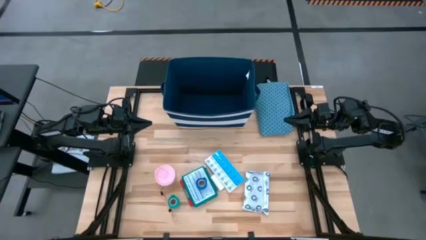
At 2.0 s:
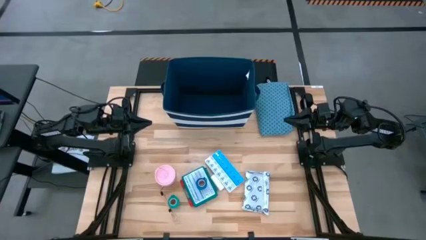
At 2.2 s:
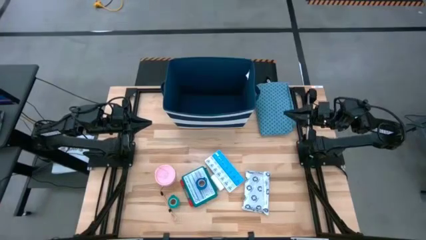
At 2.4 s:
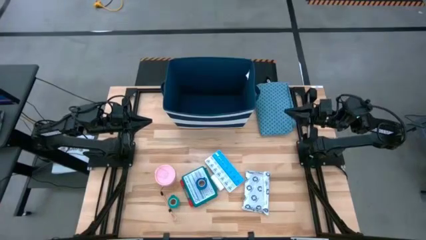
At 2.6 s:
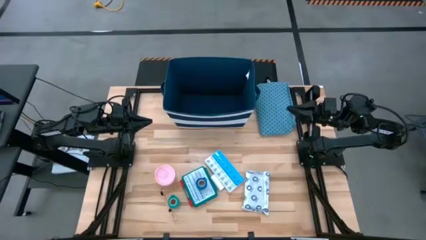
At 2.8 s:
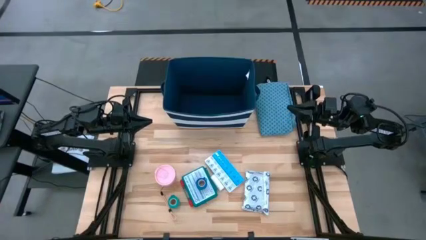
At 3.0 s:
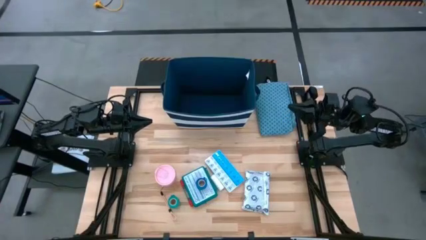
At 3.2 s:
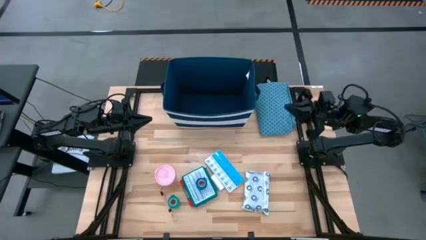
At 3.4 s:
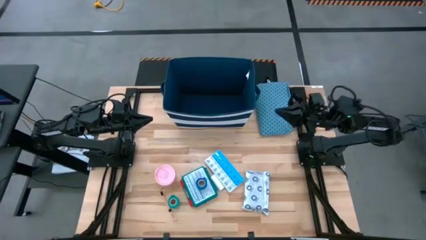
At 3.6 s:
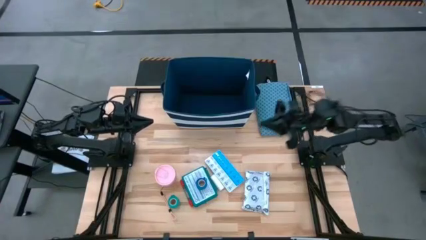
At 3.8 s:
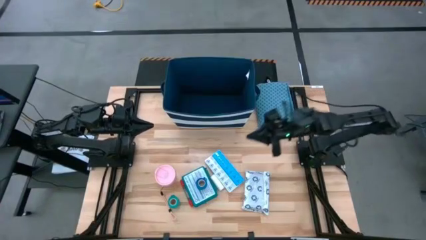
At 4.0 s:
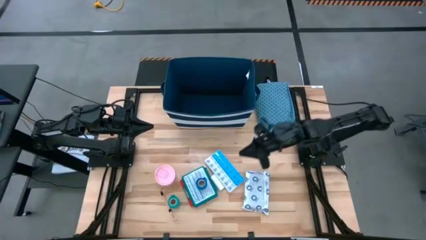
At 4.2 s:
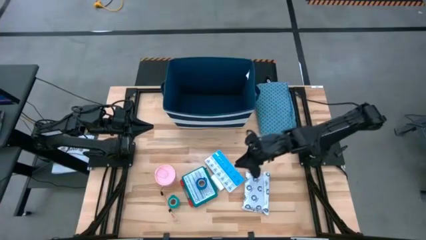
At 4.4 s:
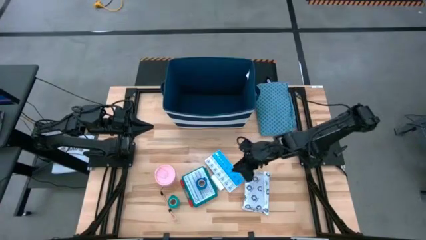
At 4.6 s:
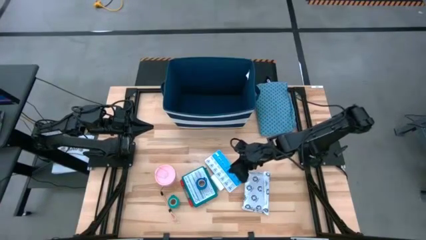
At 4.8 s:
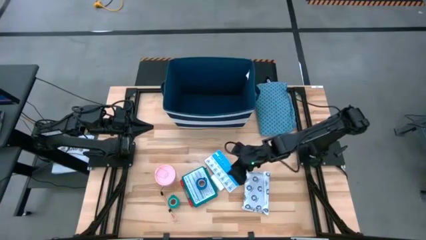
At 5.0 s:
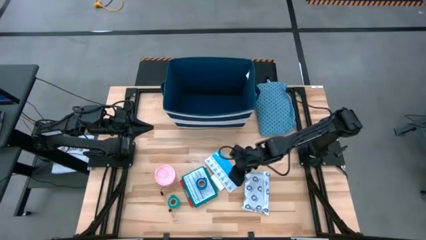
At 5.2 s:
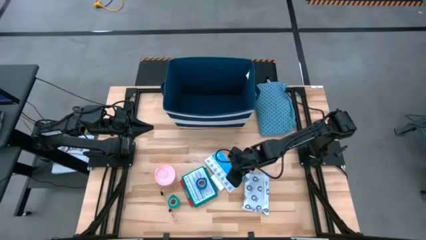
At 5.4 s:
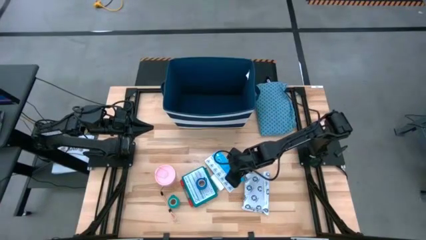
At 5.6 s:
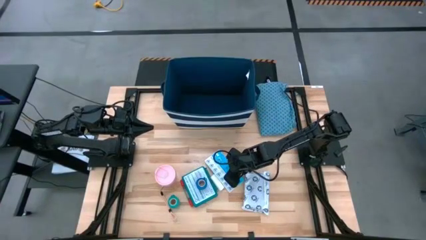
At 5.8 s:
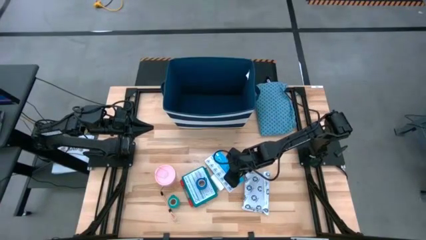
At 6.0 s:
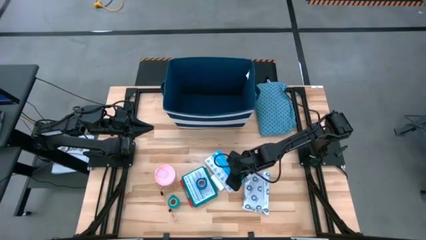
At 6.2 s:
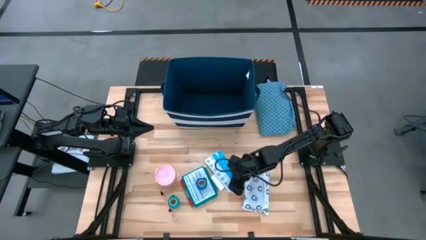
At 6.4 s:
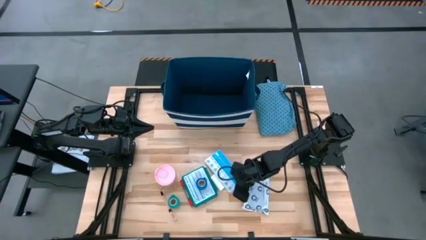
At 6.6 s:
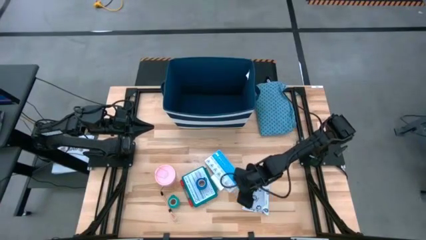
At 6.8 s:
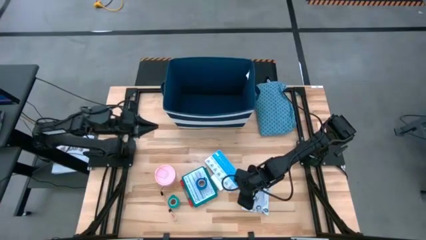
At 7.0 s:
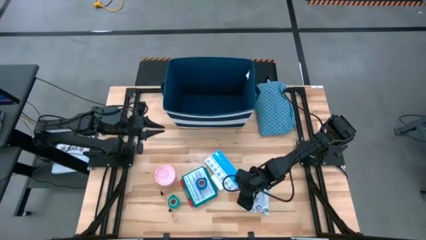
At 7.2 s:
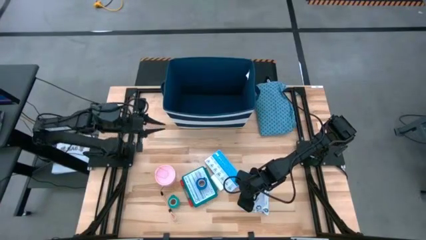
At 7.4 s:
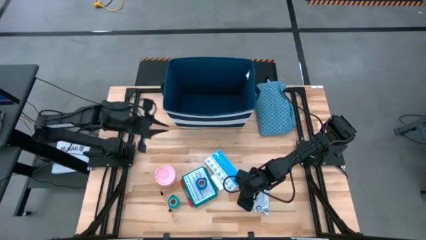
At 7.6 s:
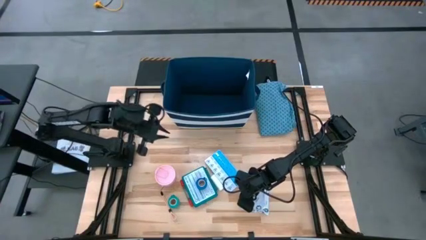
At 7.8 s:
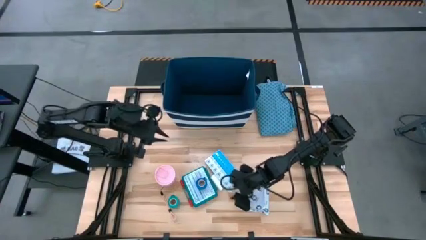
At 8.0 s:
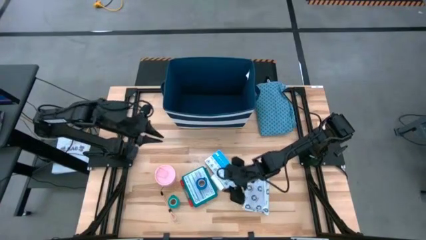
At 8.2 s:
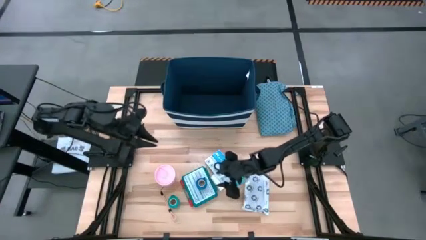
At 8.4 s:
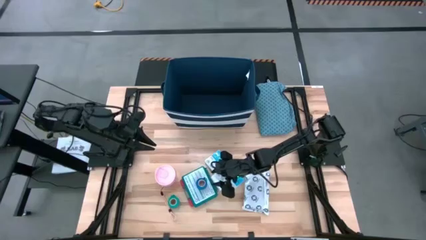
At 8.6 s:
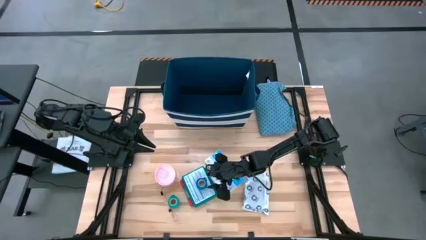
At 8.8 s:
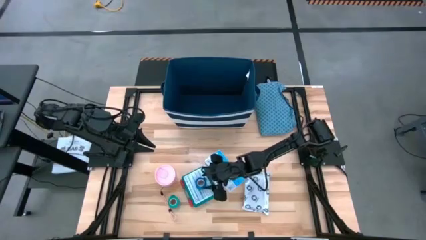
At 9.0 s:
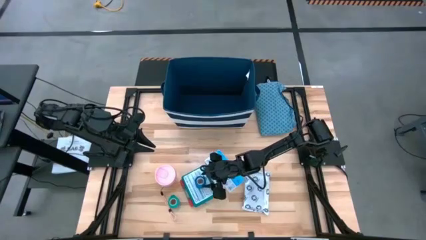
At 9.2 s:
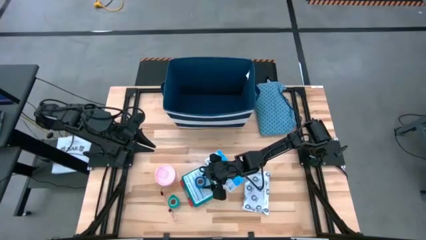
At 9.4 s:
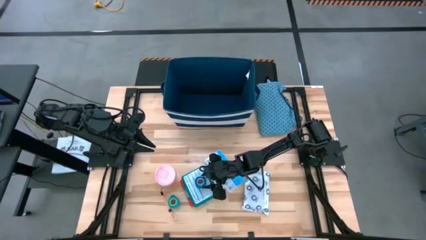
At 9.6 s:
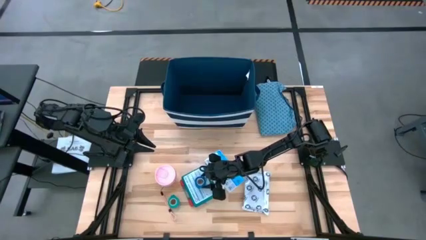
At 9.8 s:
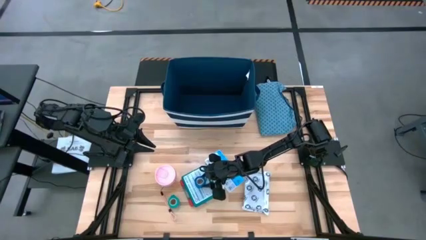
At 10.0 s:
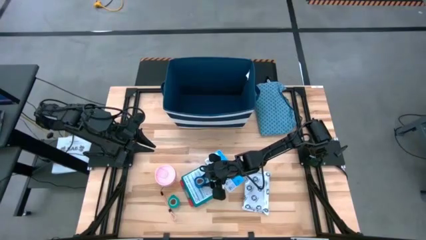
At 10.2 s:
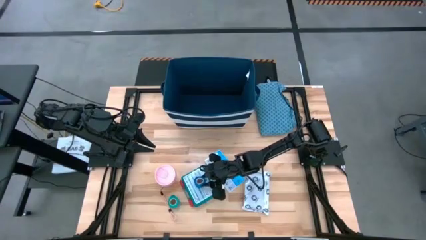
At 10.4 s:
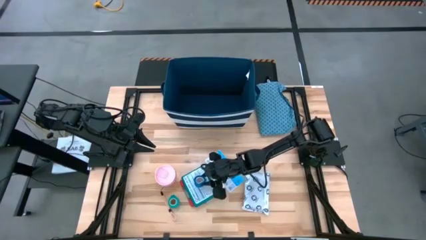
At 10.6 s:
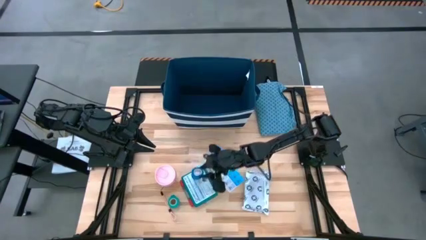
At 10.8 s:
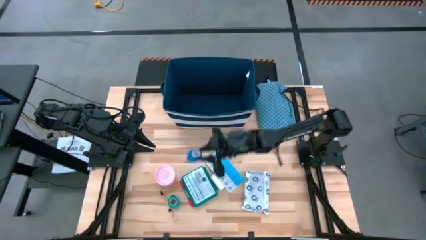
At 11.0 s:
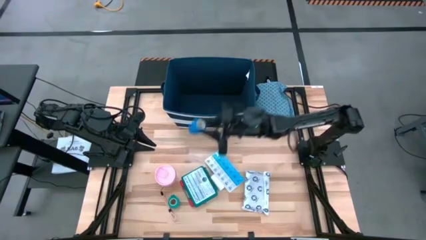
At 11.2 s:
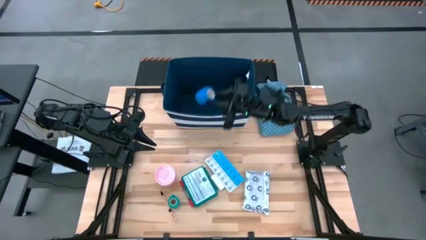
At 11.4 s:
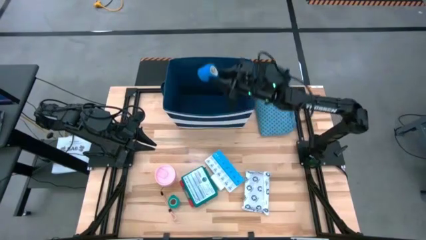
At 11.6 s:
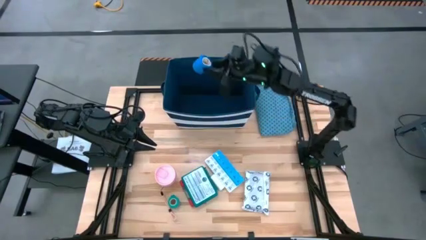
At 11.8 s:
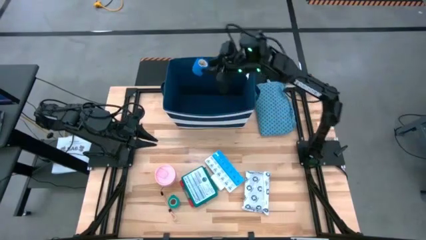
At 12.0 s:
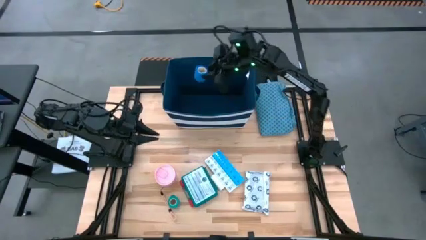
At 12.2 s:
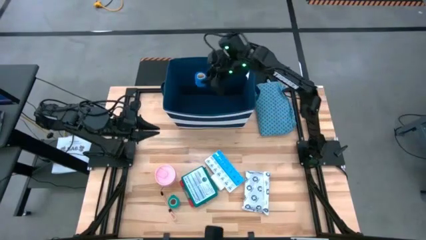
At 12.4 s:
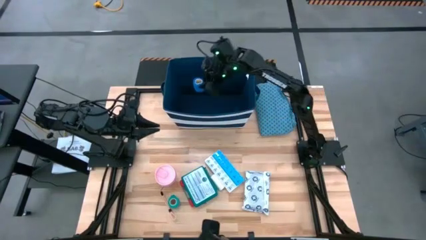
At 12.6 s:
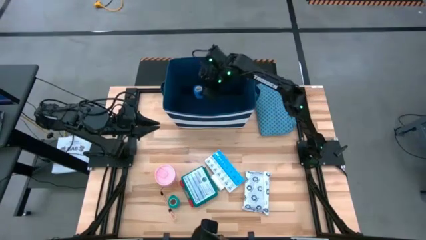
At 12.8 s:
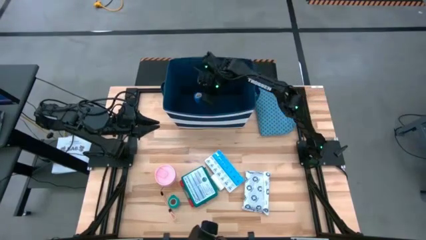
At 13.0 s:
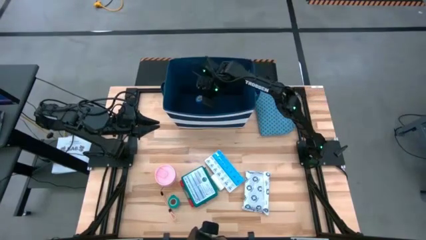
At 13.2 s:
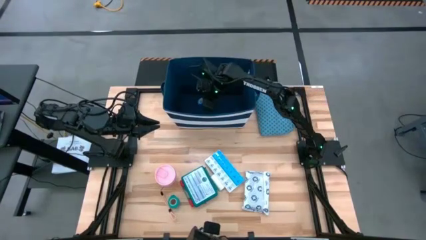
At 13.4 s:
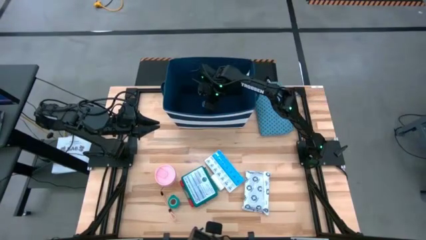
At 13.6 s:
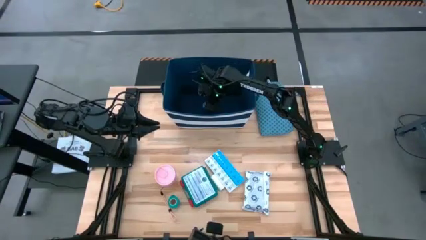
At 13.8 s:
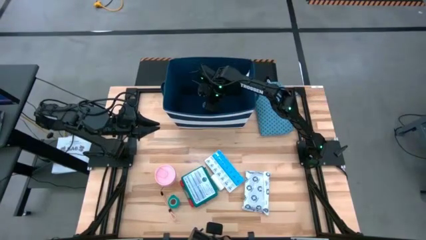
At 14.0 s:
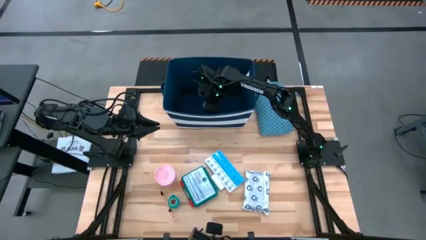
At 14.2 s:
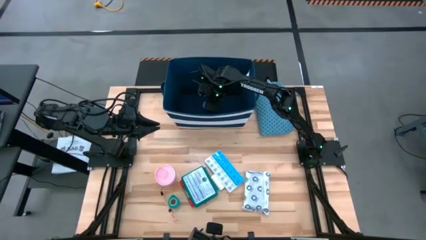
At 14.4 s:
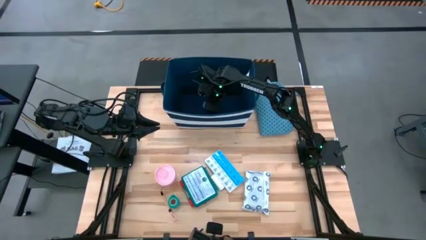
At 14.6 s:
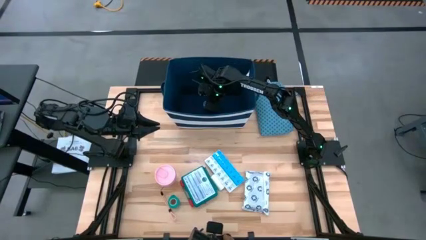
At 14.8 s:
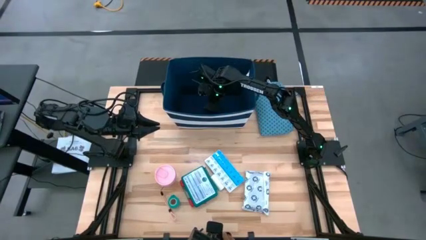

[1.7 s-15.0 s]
Task: Pick & place medical supplies in basket/bin
Put the blue bandage into the bin
